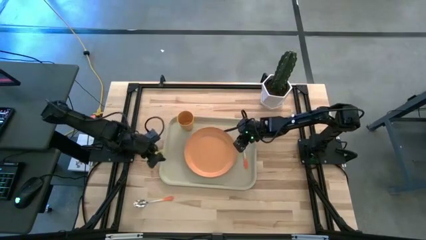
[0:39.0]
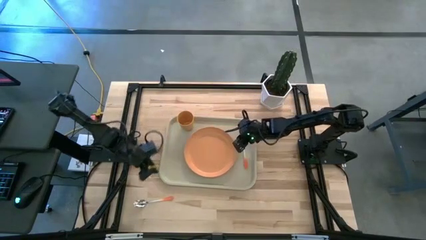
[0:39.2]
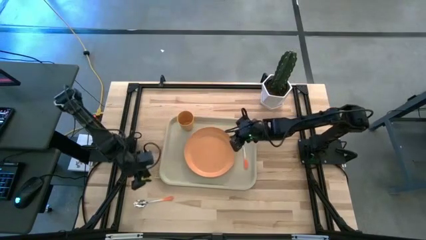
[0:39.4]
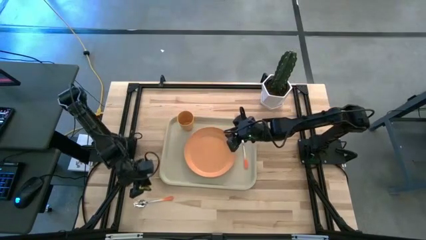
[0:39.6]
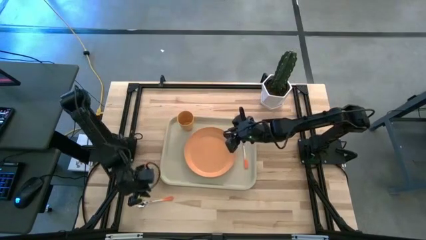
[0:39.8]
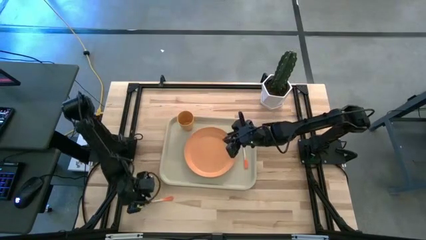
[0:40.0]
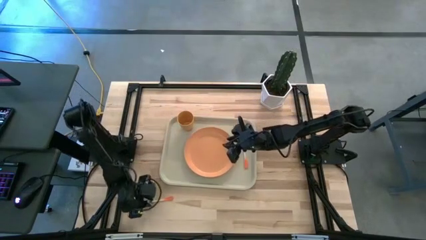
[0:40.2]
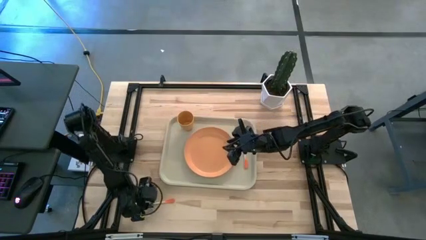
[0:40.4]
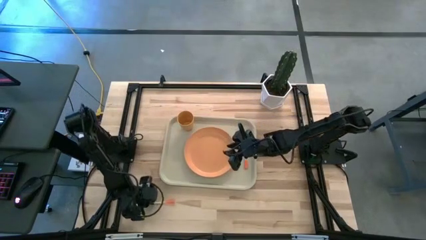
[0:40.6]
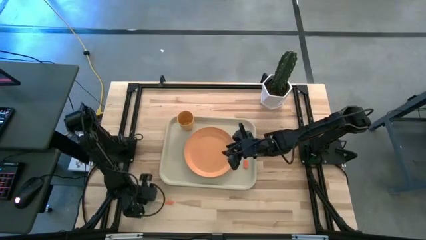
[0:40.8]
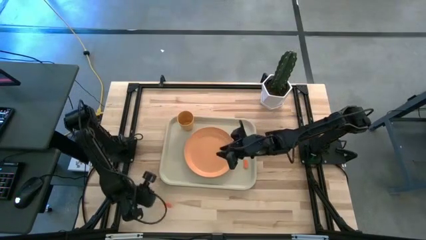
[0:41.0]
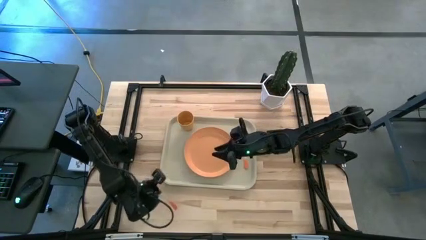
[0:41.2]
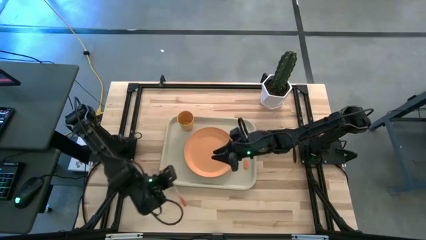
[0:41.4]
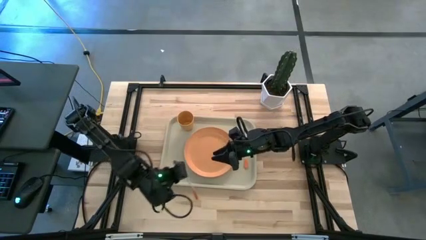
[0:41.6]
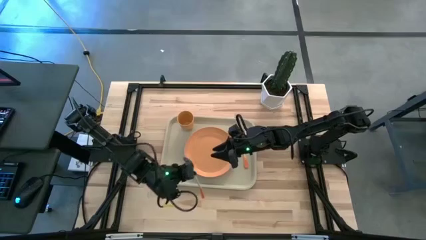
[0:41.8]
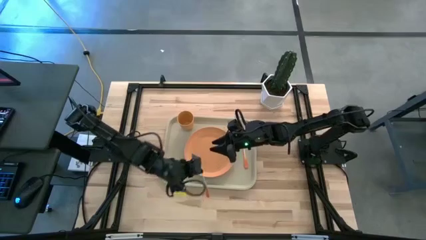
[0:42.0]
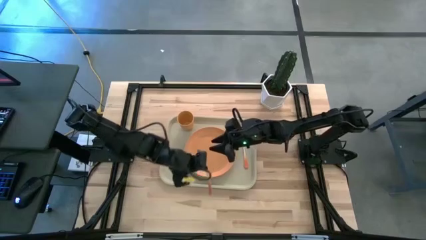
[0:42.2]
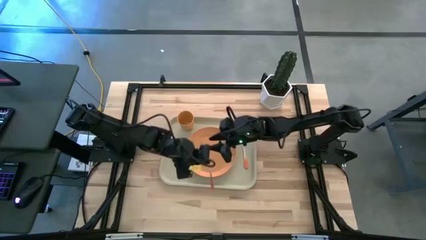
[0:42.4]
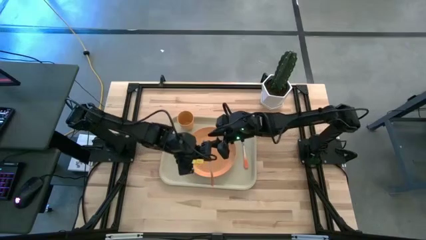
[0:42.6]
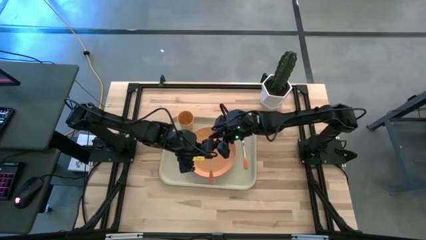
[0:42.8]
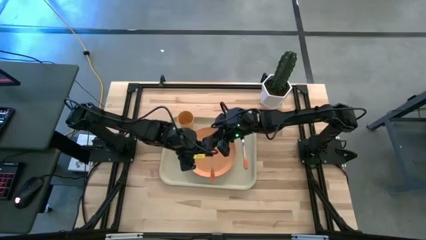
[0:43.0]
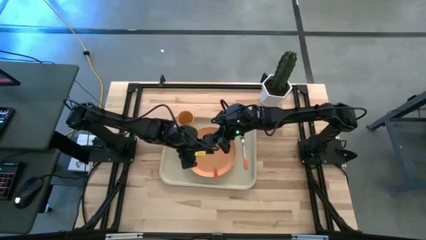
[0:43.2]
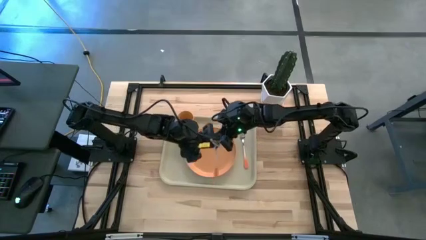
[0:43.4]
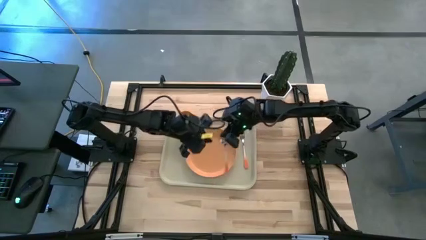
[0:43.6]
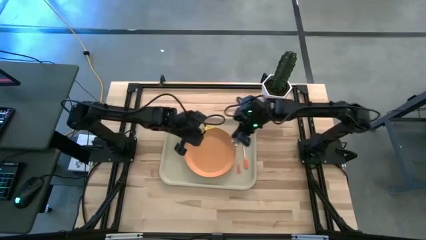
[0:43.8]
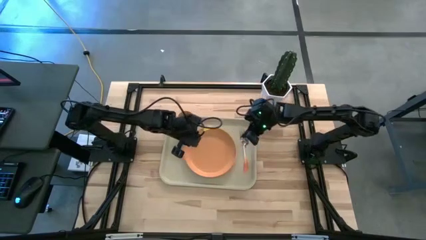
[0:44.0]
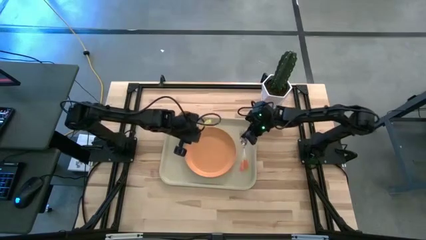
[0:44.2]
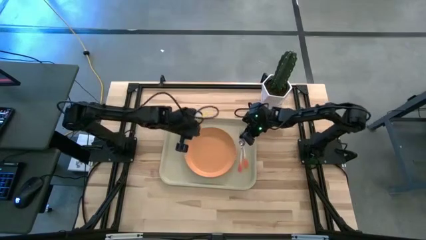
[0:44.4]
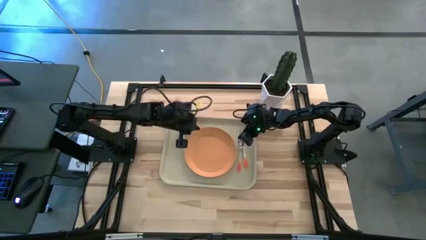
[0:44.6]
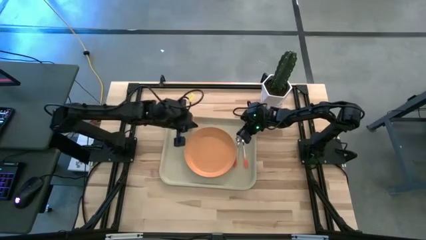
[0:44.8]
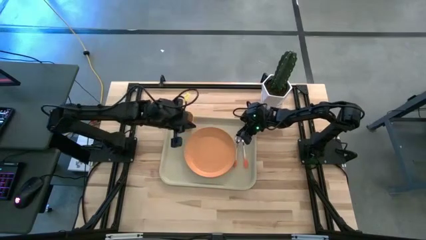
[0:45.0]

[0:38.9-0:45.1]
Task: Pick and place plate/cup/fork/spoon on tray
Put the orange spoon on the serving tray to the left of the orange fork

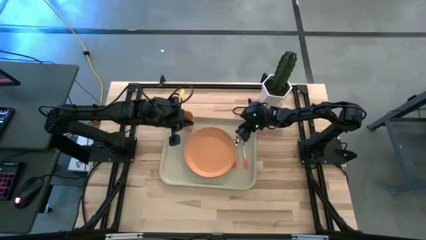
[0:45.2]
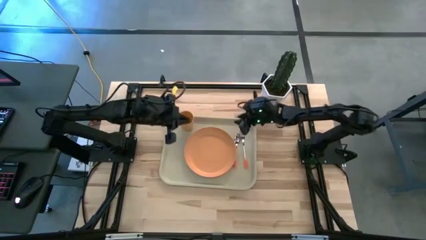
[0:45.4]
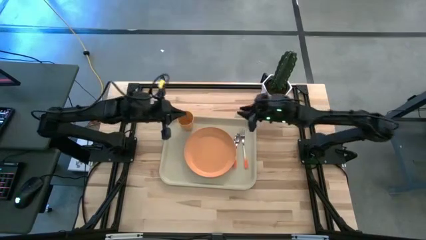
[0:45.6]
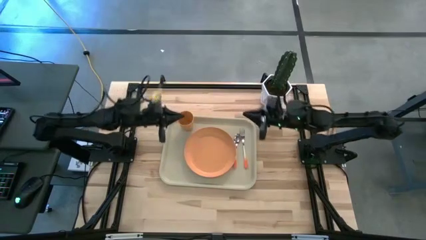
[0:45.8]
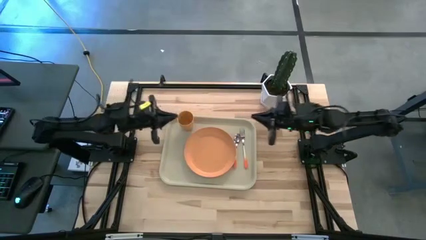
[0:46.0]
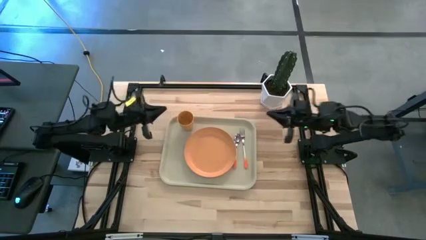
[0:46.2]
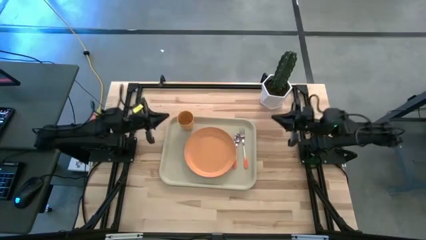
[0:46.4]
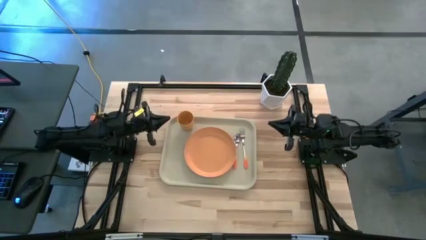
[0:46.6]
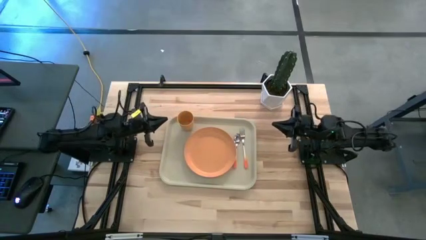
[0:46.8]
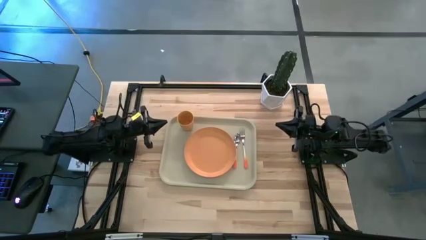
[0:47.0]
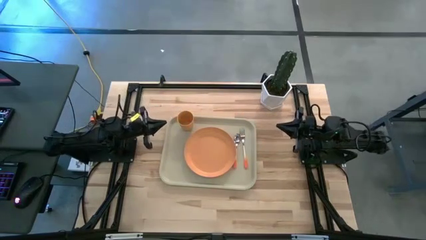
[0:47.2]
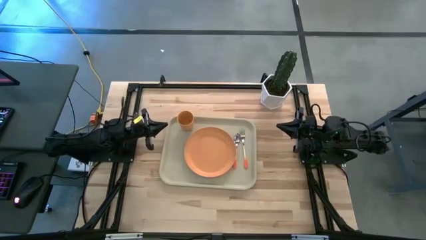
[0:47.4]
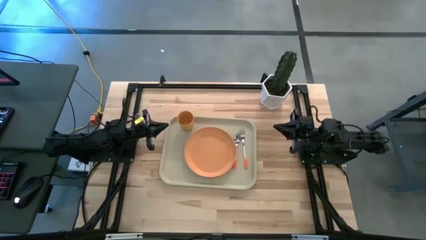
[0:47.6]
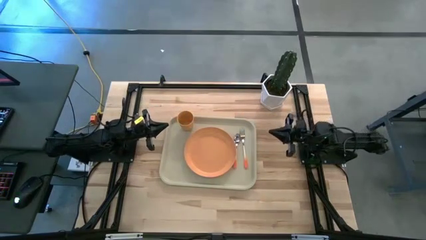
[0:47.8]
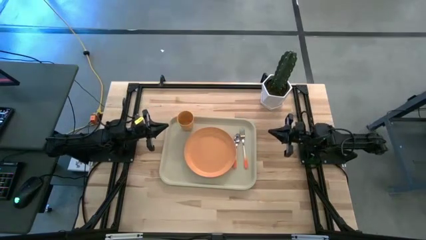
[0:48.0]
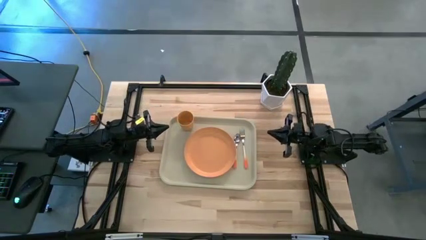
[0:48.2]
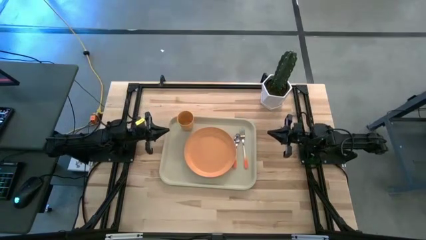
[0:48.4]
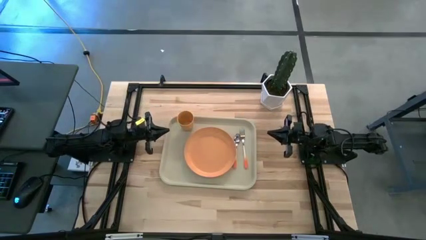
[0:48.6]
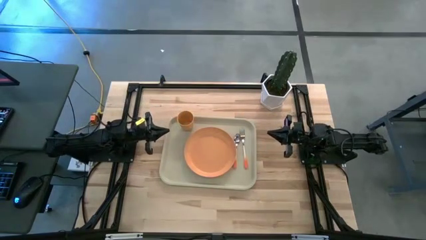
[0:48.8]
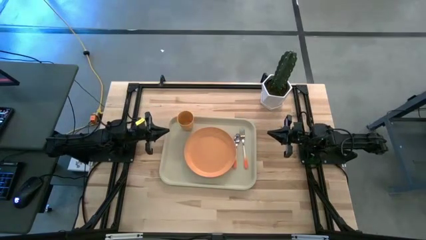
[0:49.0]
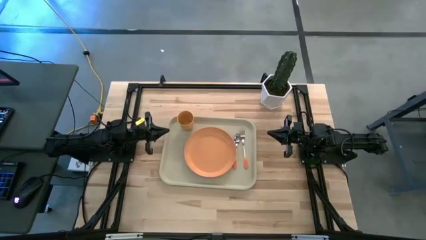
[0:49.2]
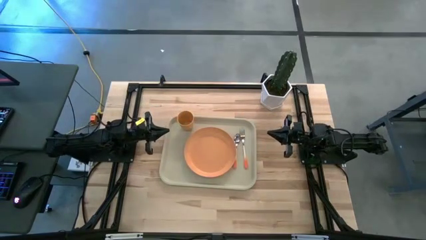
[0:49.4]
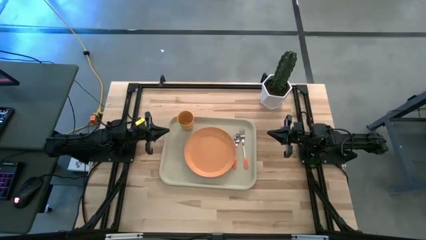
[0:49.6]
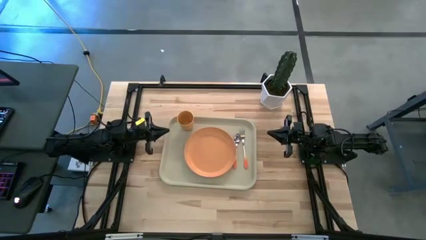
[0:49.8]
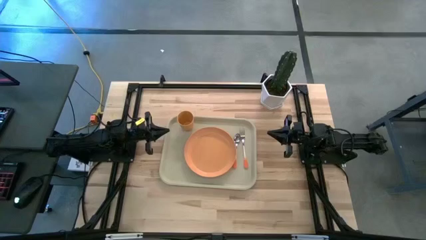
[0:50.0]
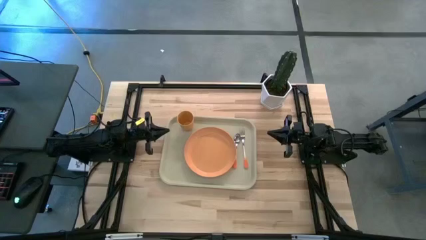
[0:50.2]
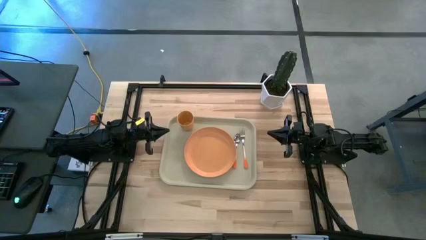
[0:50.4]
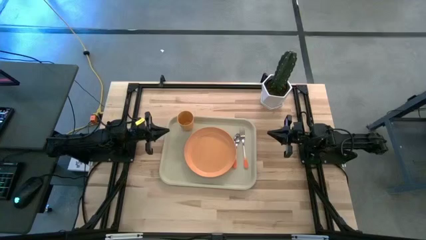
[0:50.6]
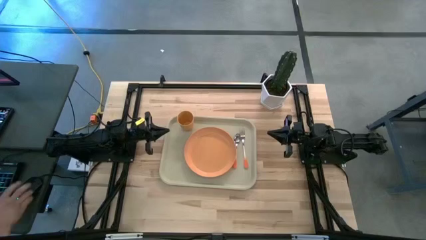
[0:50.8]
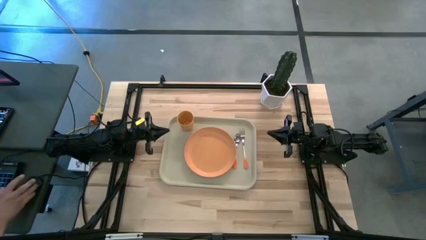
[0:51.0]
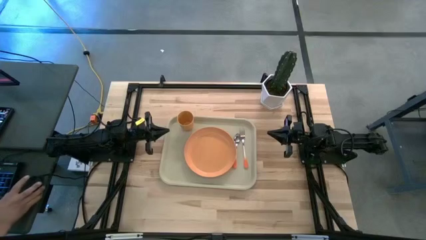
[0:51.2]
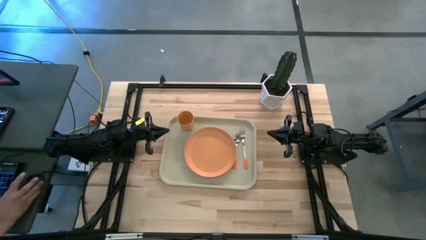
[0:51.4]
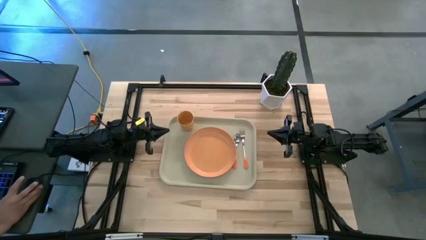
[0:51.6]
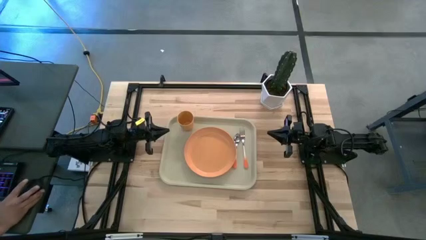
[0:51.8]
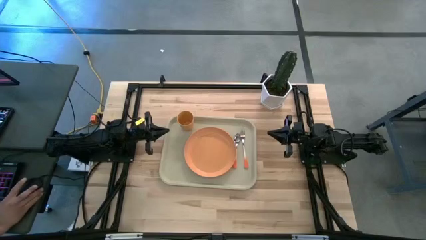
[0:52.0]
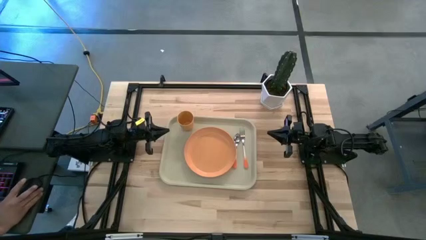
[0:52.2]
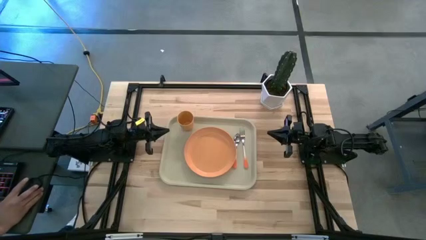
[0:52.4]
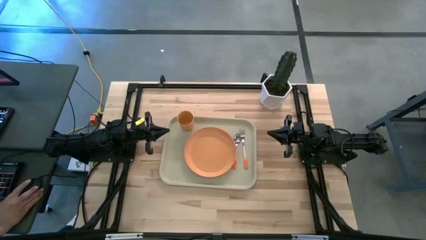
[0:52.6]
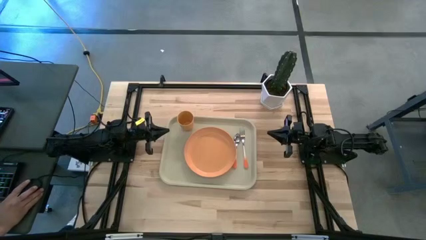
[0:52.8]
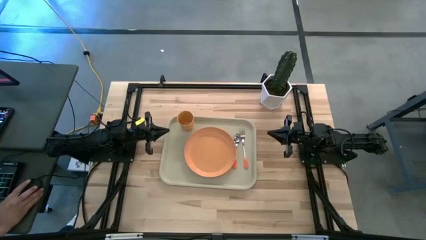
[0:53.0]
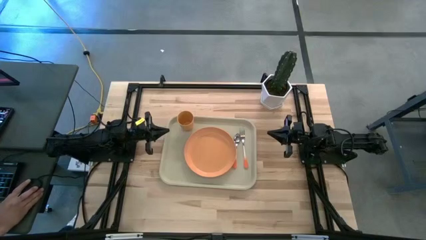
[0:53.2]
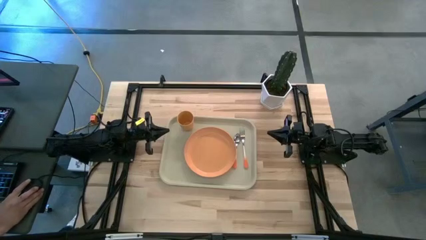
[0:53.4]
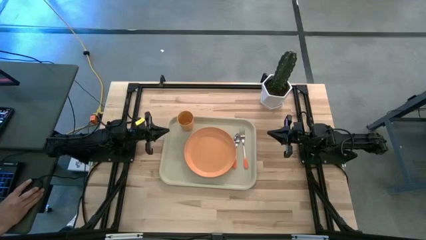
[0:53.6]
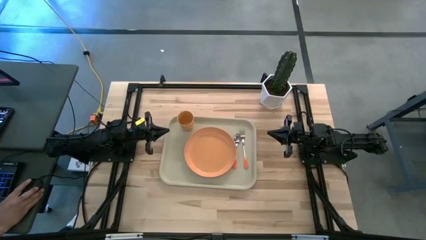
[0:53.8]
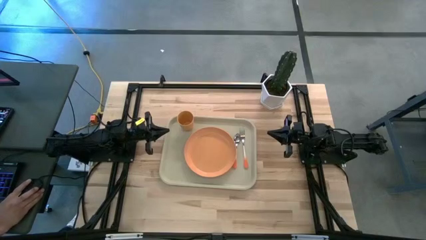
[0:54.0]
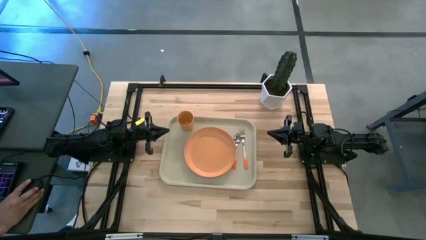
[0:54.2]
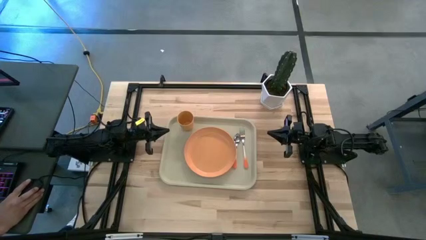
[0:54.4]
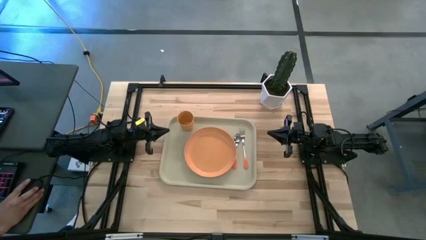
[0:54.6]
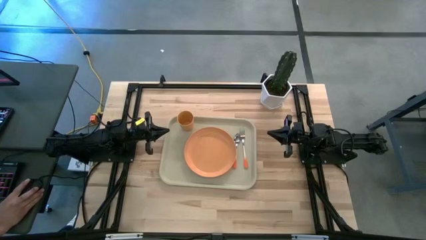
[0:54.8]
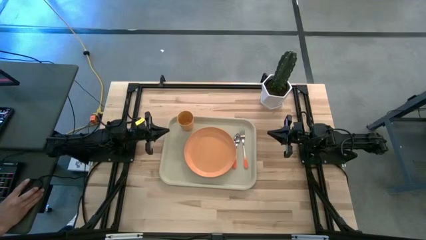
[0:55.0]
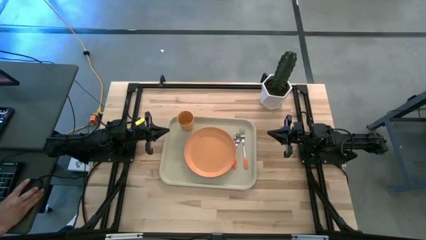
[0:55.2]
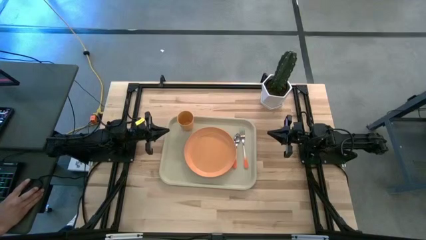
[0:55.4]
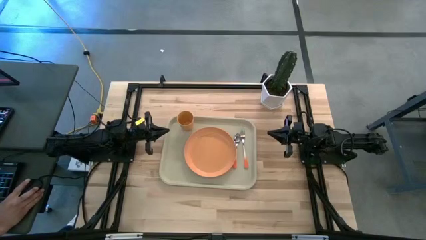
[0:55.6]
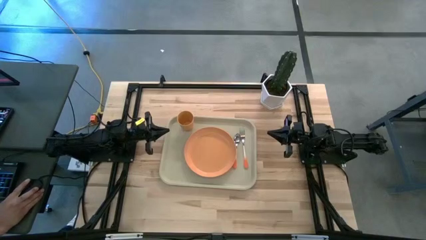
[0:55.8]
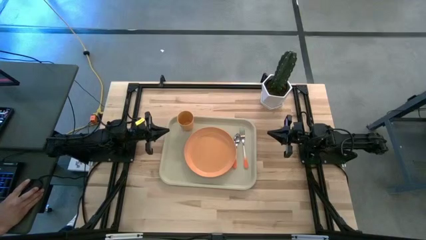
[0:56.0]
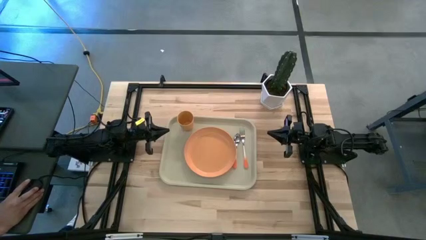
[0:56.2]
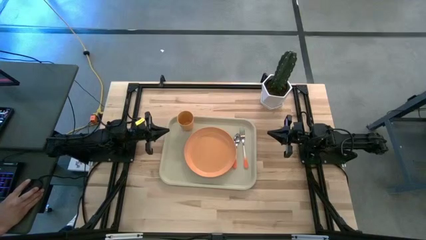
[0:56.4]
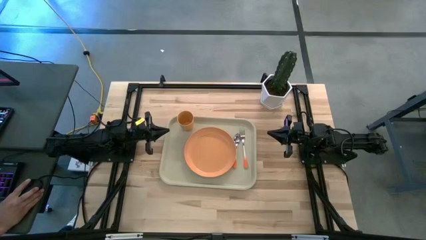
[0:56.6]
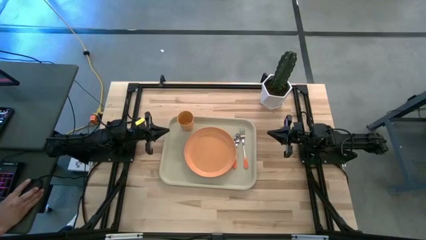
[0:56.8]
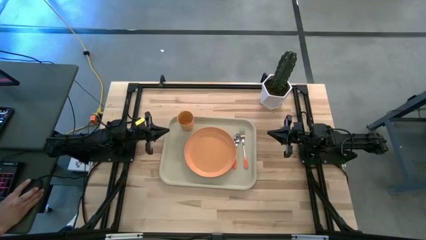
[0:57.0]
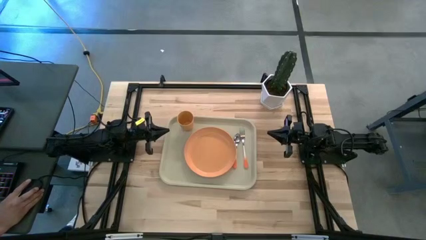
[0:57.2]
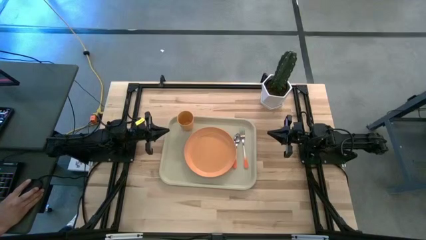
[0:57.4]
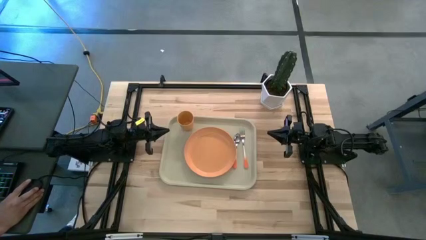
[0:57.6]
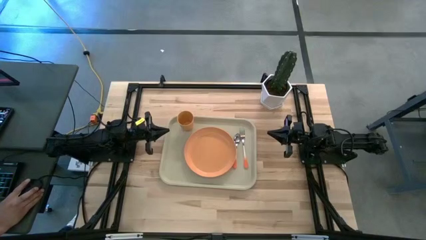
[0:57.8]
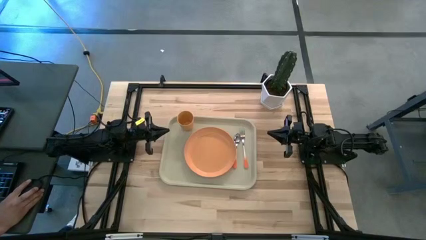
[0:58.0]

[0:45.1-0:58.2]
Return to Home Position
